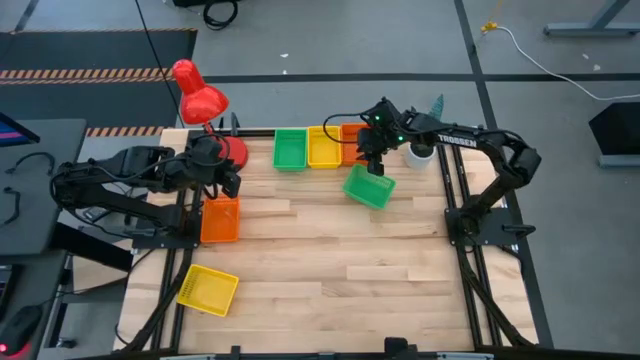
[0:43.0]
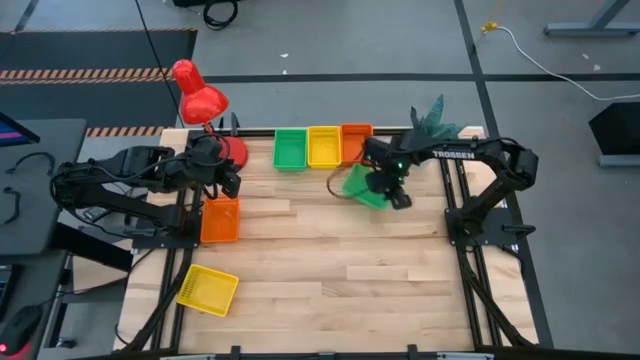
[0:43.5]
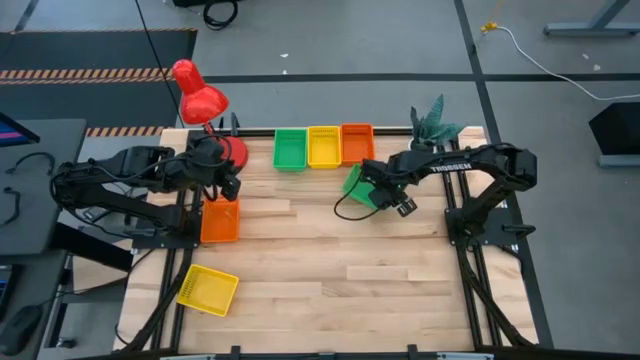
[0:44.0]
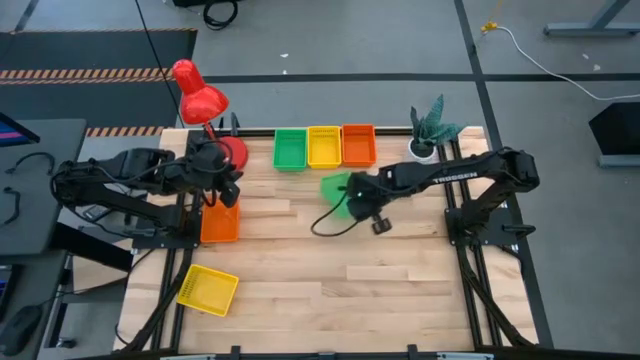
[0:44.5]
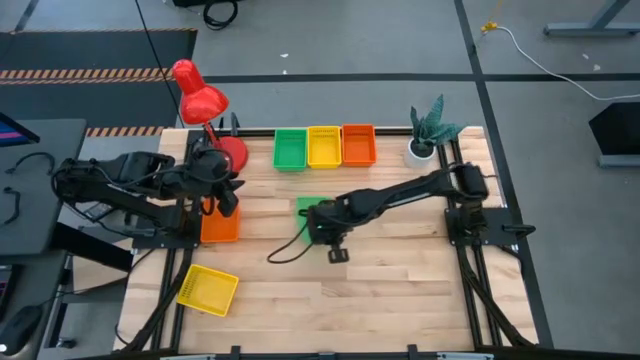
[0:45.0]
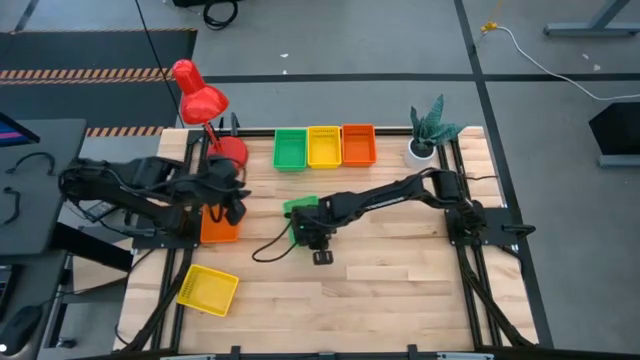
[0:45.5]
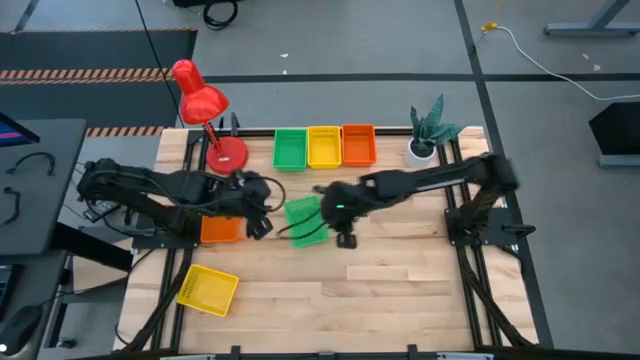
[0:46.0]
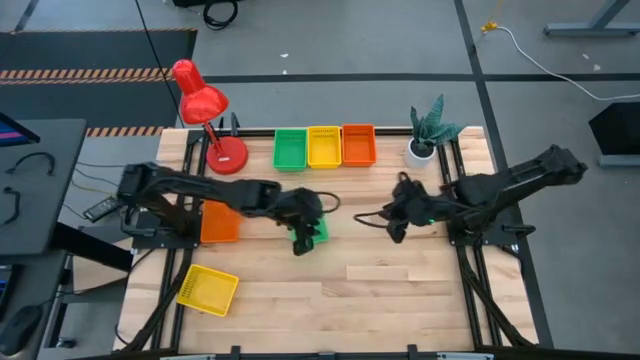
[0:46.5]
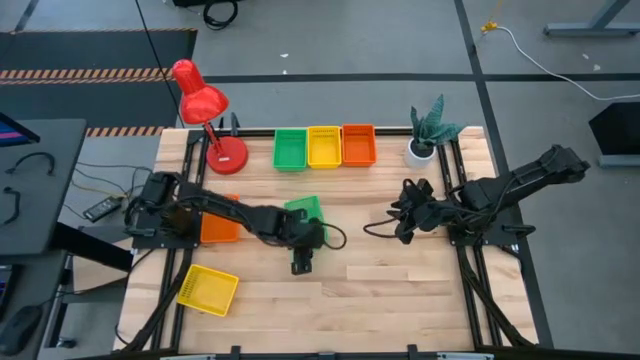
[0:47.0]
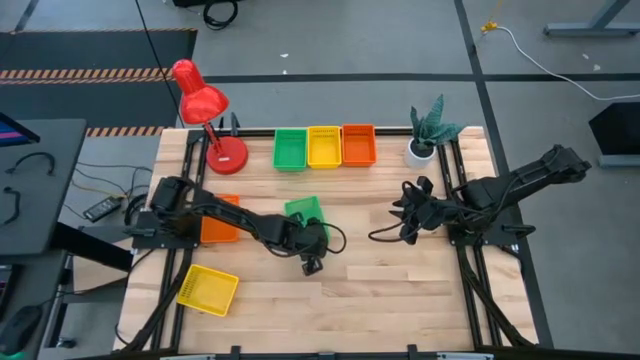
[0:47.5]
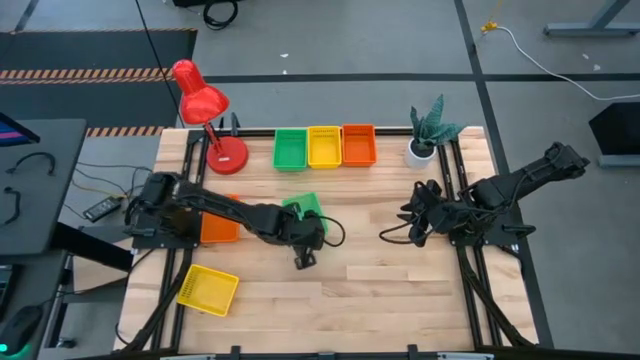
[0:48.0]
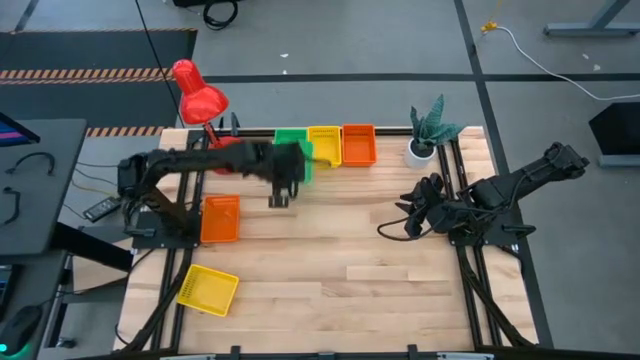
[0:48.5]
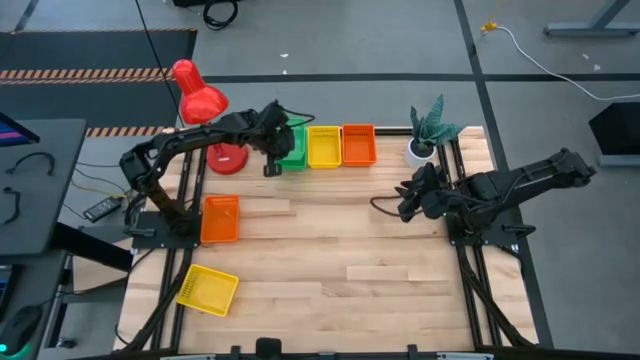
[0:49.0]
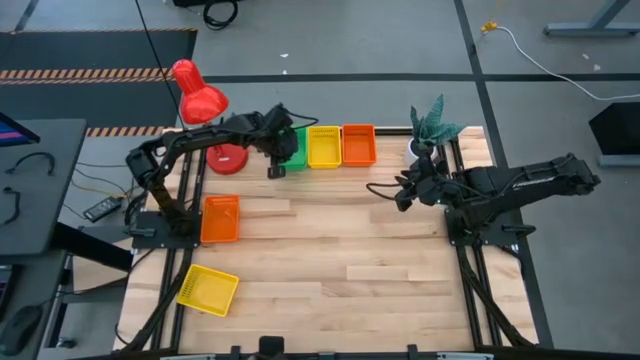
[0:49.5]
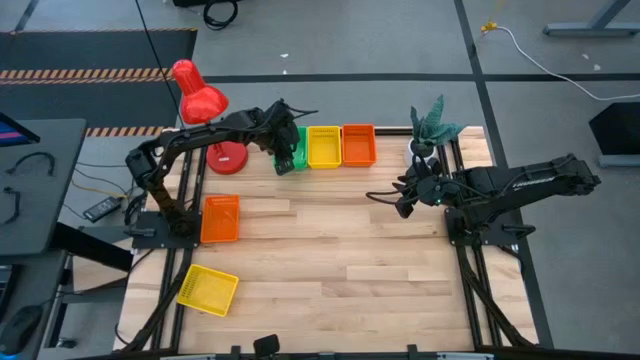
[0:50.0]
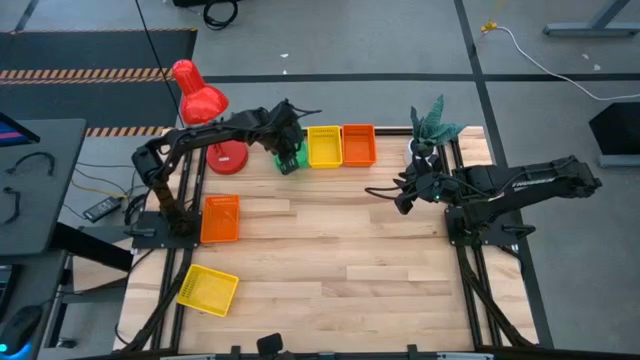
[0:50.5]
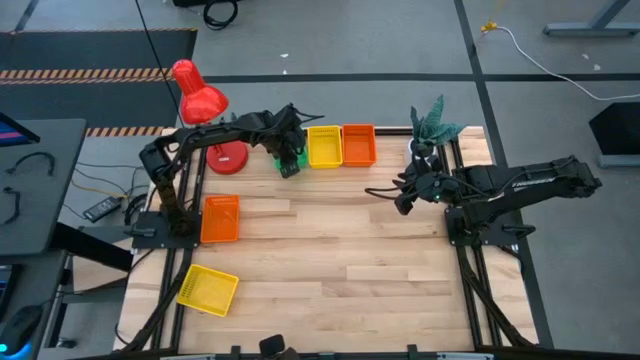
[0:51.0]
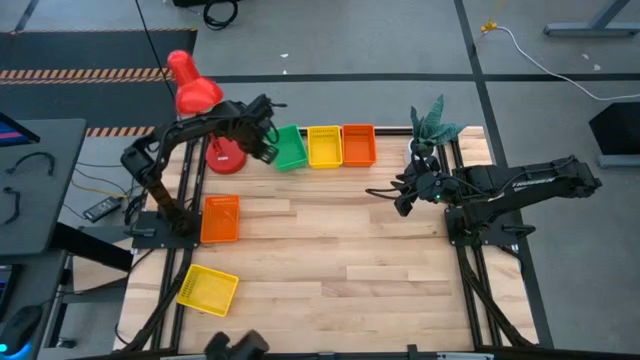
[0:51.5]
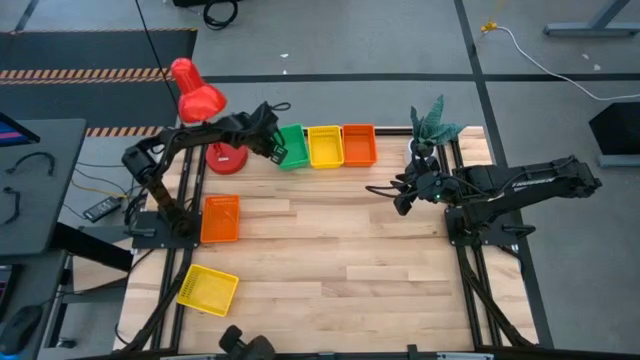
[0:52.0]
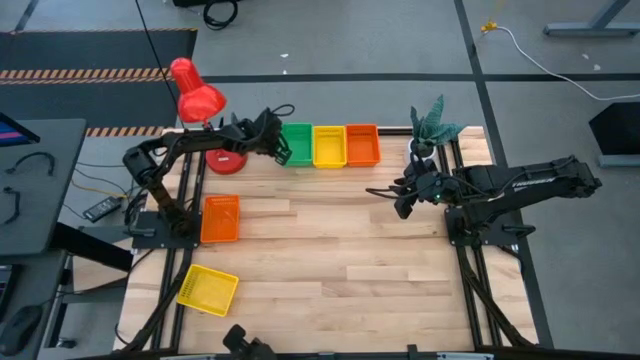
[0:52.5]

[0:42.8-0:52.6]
Stack the right green bin on top of the left green bin

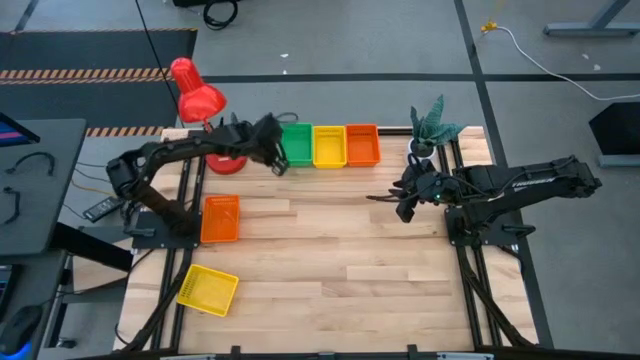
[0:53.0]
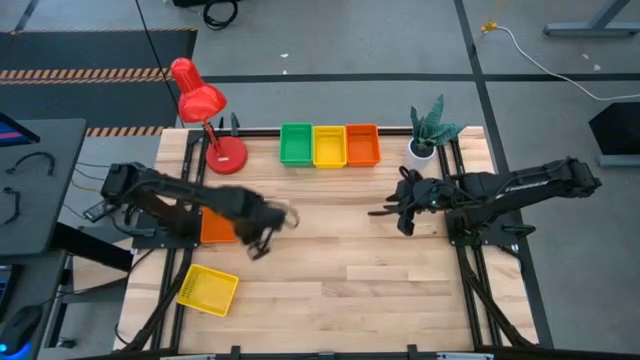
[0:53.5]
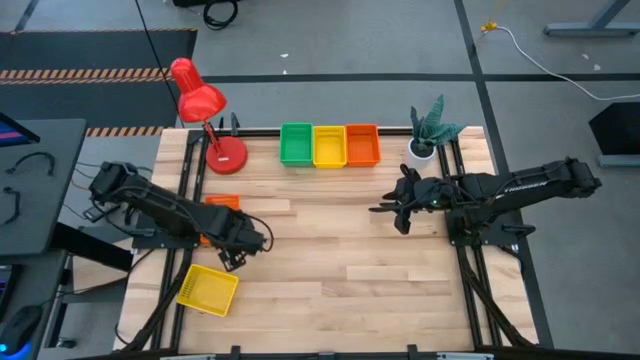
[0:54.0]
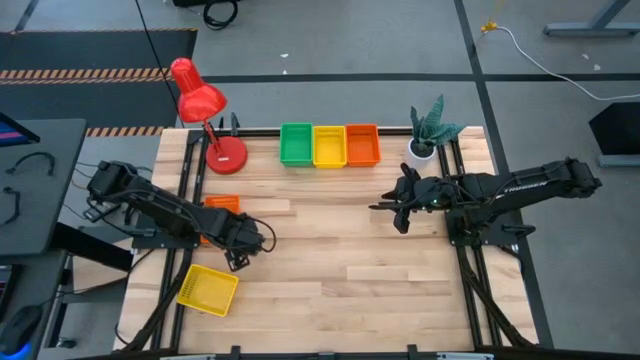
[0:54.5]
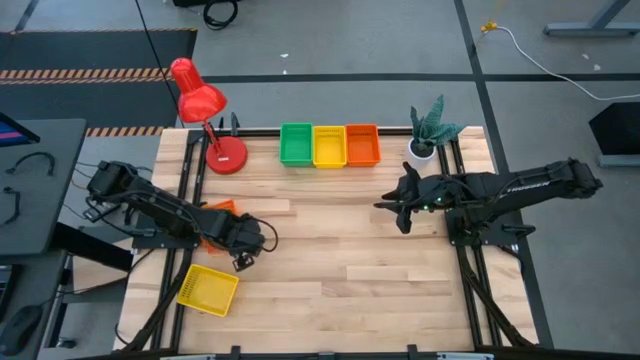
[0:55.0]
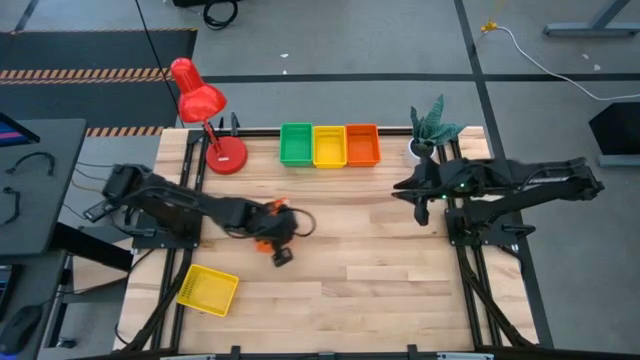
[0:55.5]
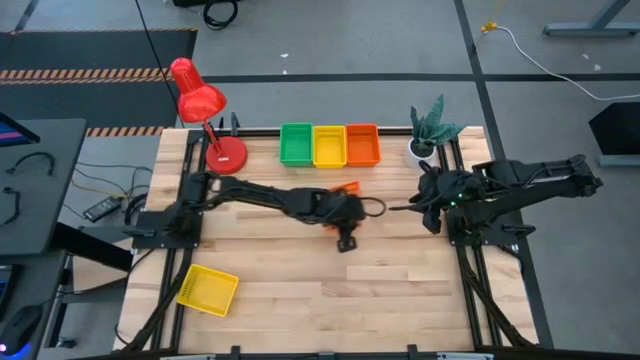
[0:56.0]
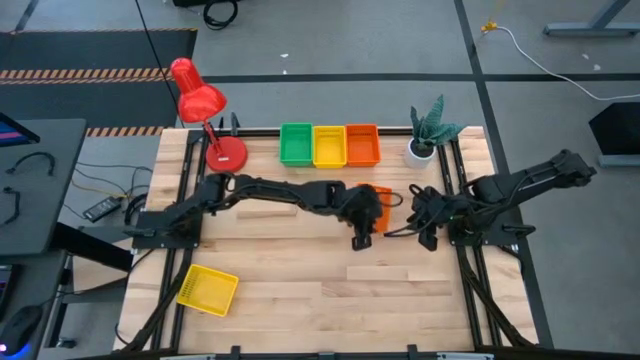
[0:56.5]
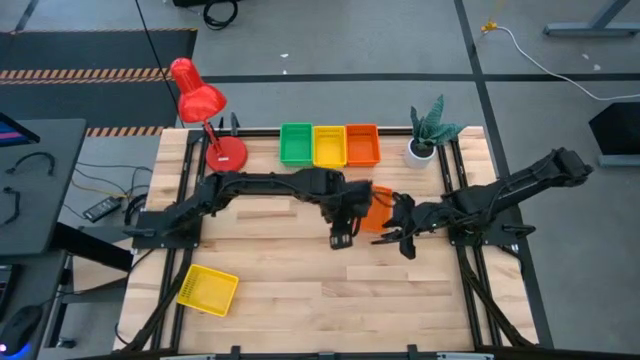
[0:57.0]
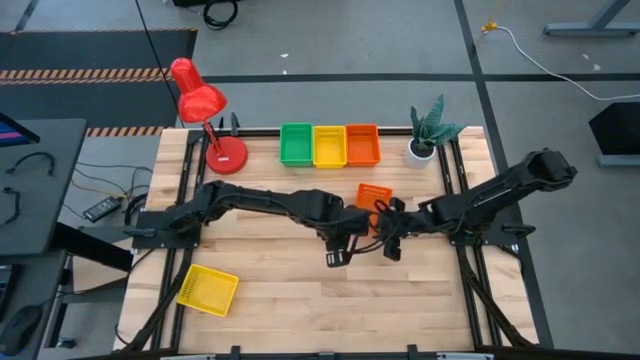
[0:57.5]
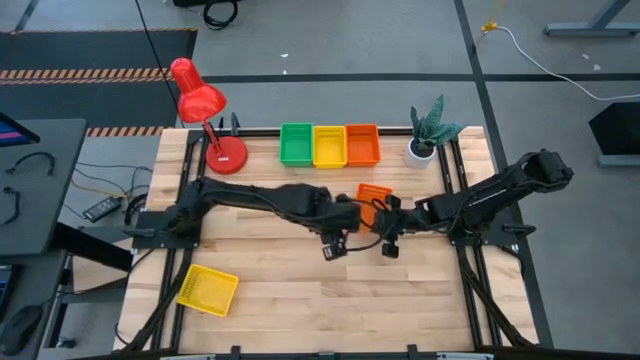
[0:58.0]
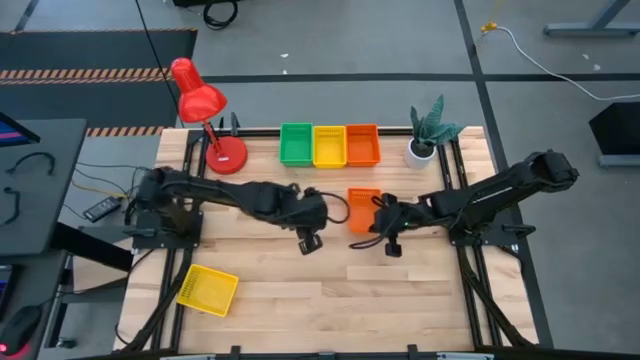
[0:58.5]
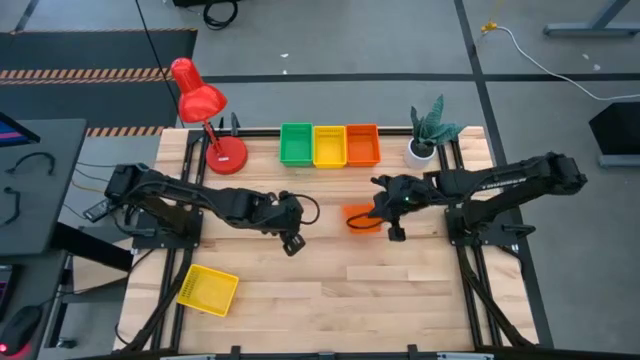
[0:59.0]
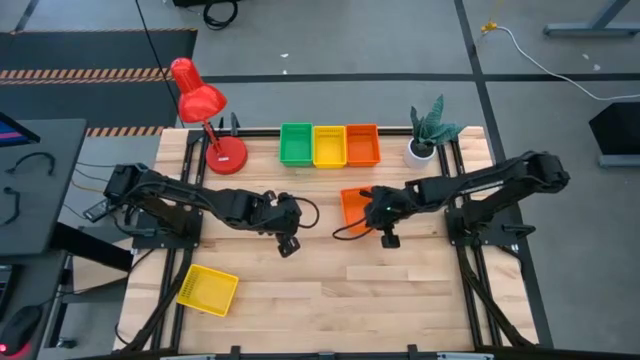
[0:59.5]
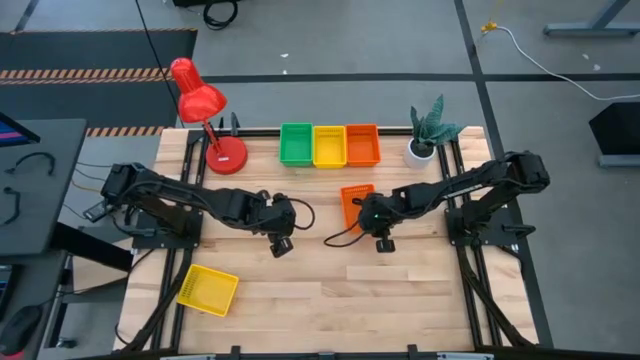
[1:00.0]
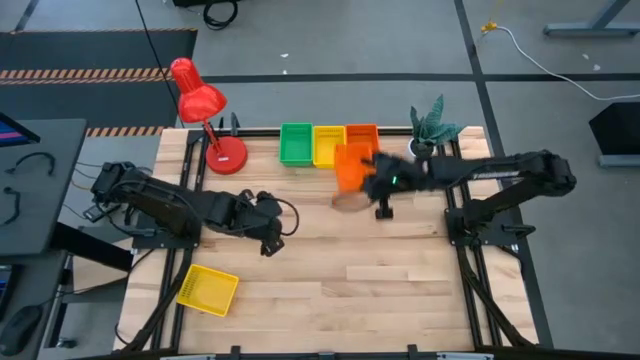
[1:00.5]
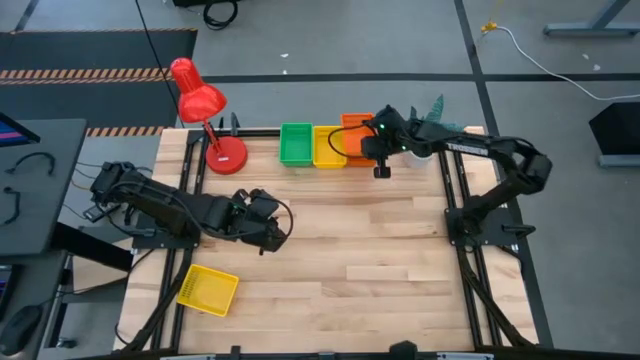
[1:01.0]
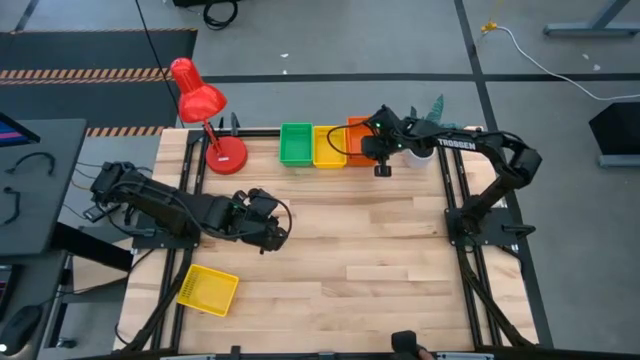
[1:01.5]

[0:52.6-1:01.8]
Stack the left orange bin on top of the right orange bin

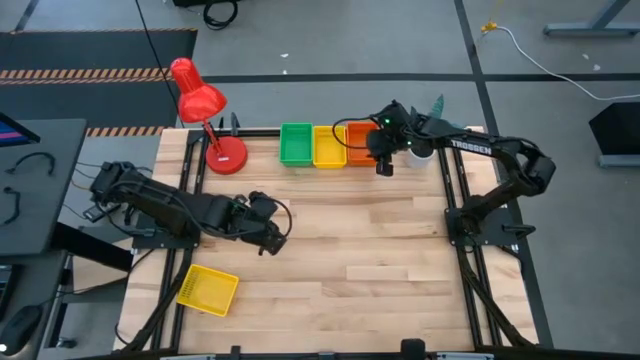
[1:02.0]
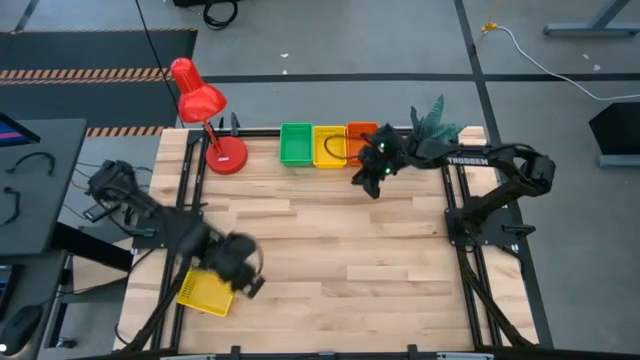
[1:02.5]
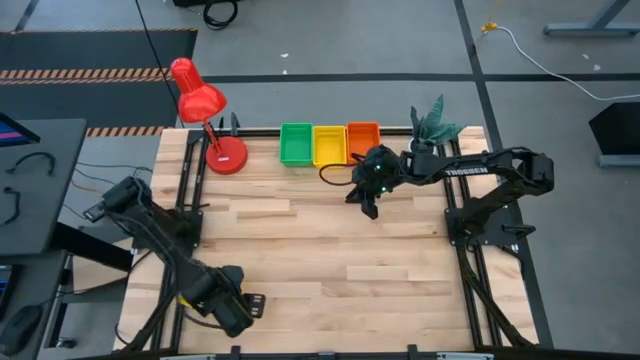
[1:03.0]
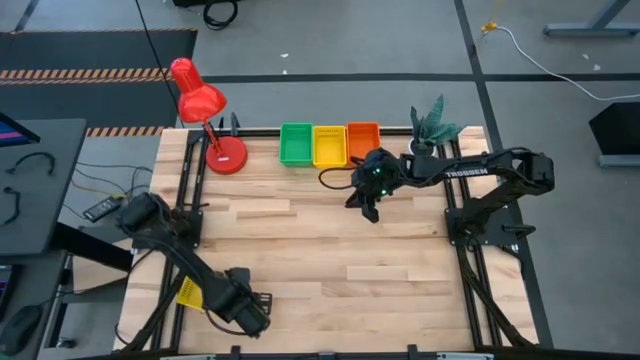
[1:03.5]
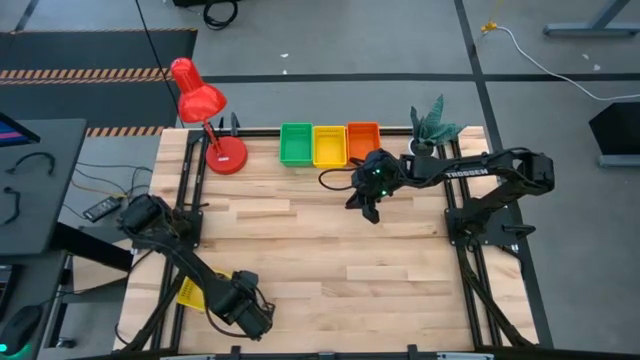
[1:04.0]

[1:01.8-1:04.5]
Stack the bottom yellow bin on top of the top yellow bin
